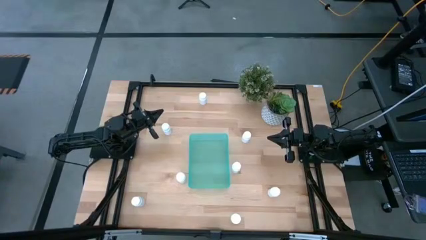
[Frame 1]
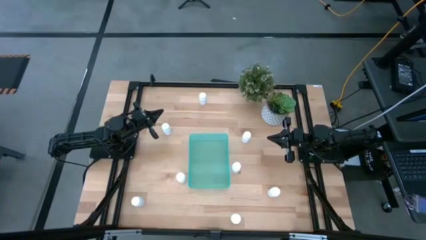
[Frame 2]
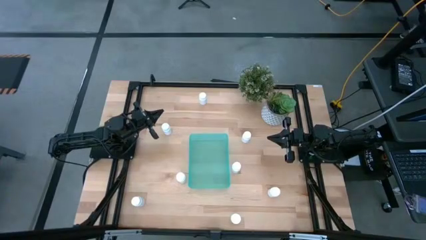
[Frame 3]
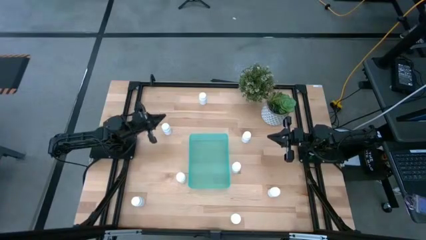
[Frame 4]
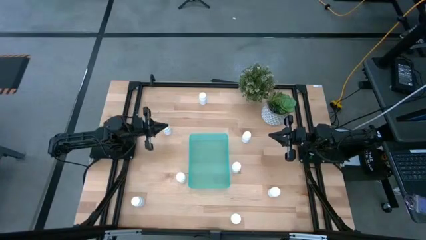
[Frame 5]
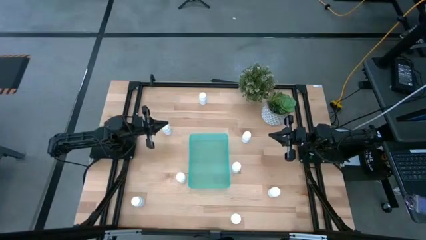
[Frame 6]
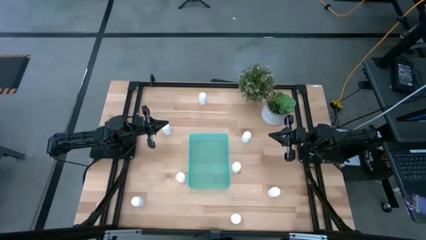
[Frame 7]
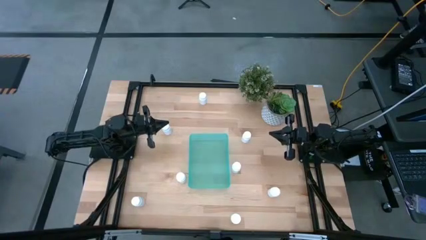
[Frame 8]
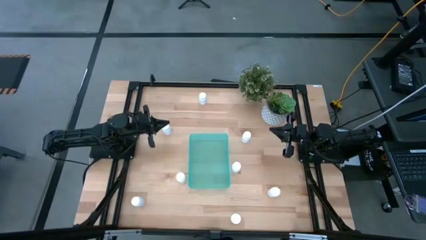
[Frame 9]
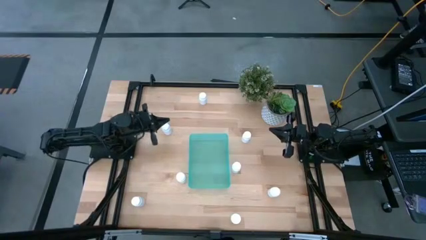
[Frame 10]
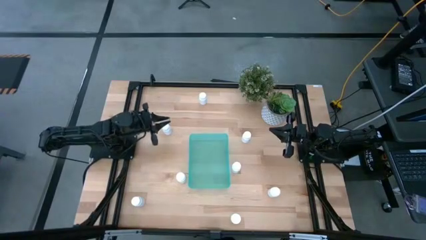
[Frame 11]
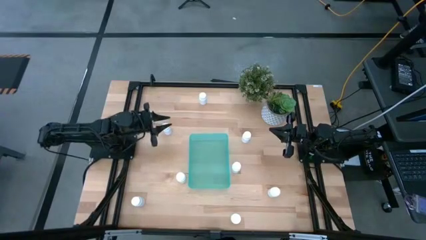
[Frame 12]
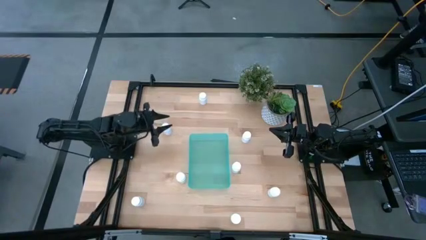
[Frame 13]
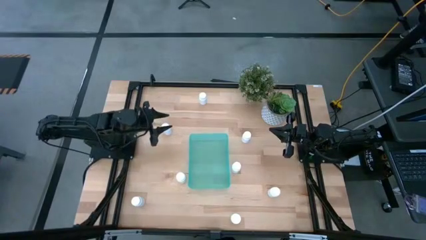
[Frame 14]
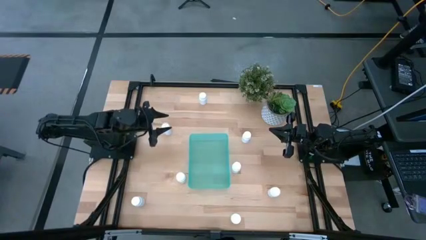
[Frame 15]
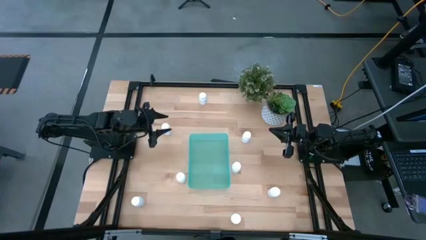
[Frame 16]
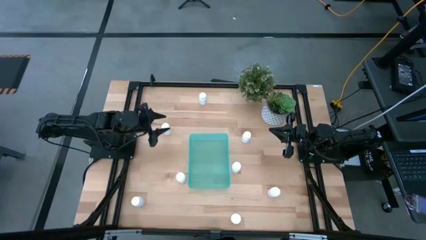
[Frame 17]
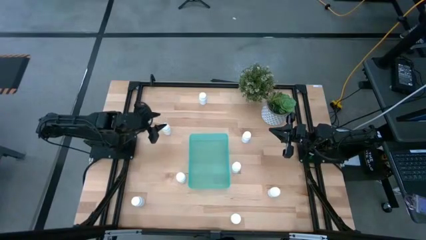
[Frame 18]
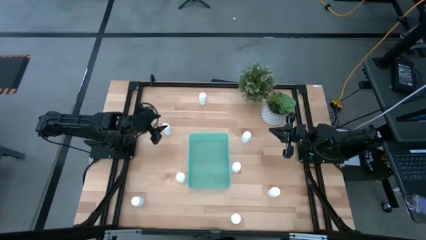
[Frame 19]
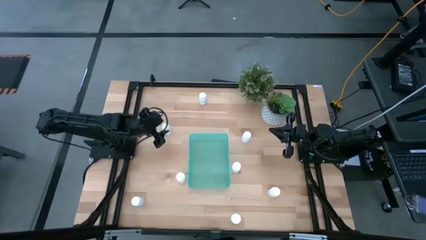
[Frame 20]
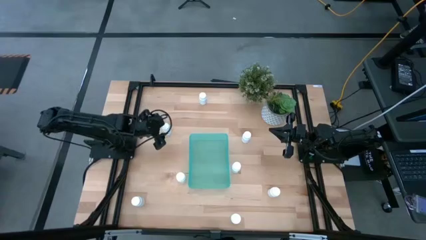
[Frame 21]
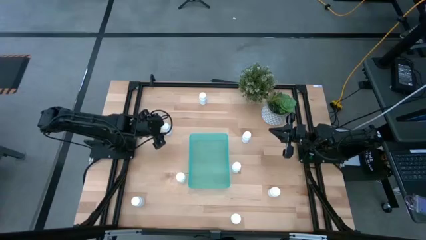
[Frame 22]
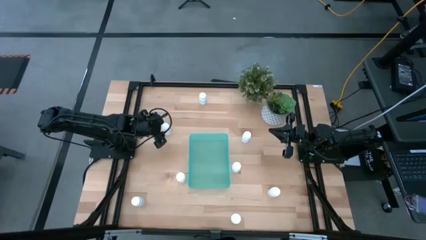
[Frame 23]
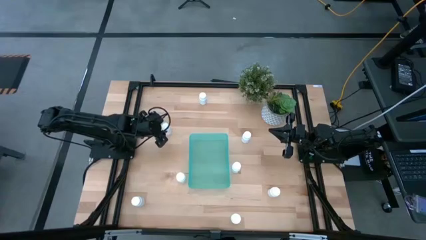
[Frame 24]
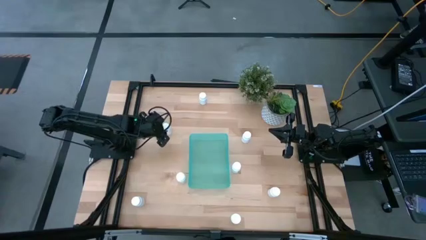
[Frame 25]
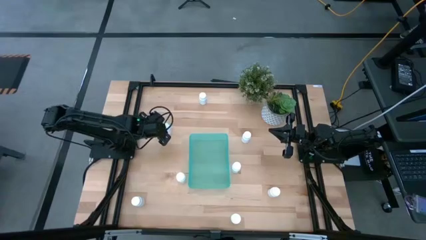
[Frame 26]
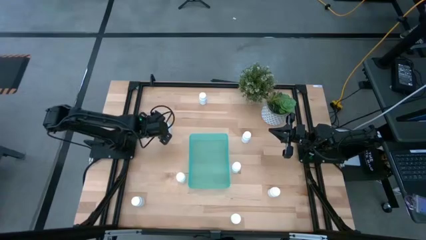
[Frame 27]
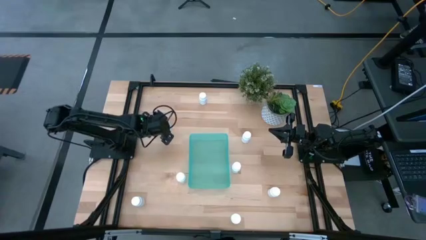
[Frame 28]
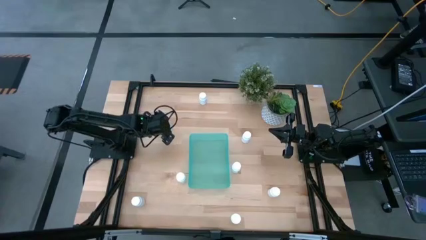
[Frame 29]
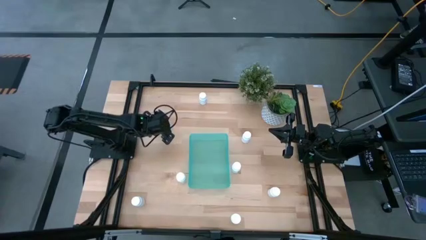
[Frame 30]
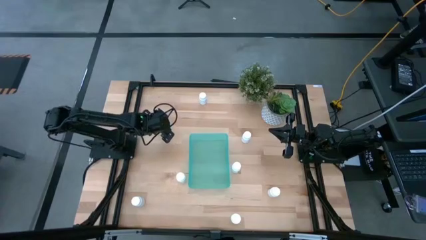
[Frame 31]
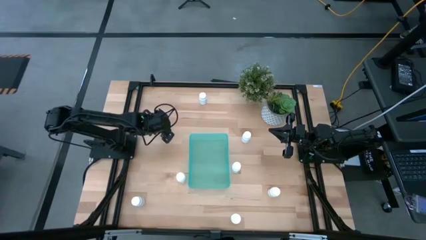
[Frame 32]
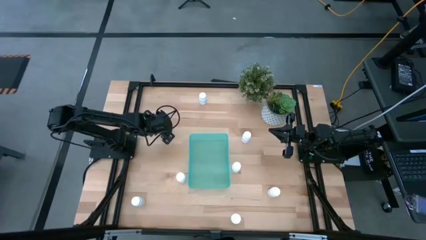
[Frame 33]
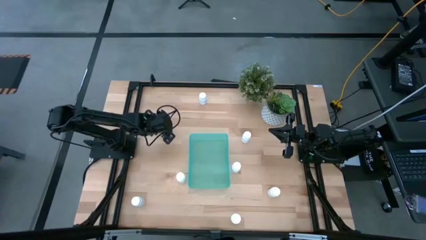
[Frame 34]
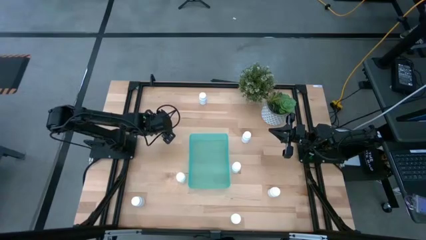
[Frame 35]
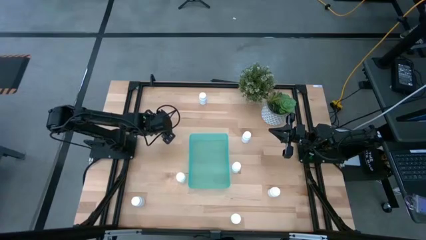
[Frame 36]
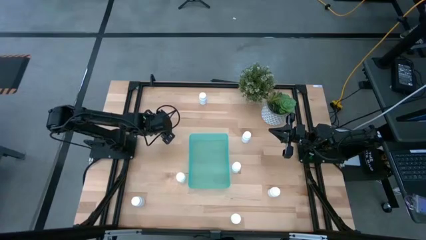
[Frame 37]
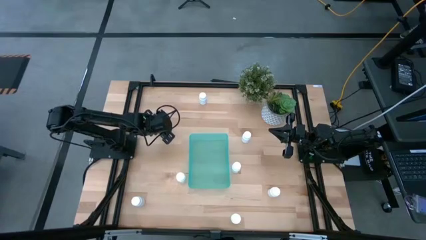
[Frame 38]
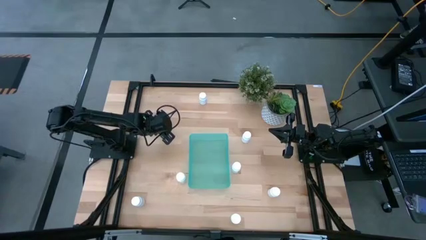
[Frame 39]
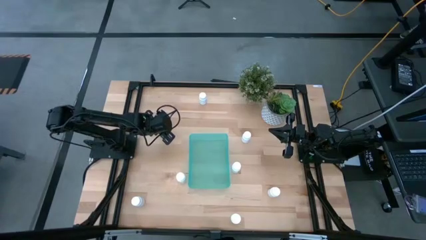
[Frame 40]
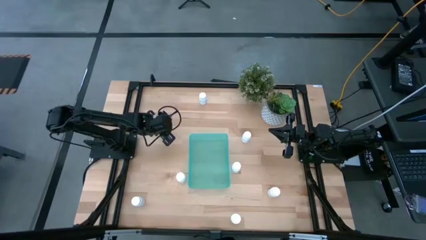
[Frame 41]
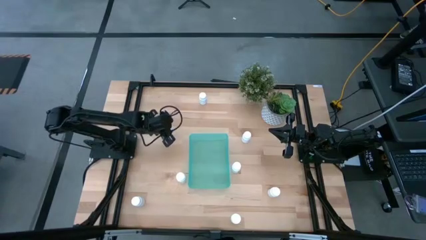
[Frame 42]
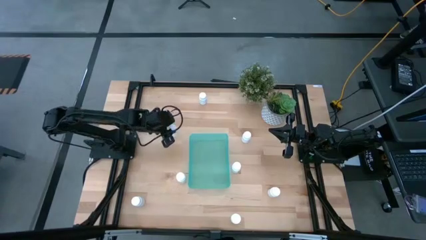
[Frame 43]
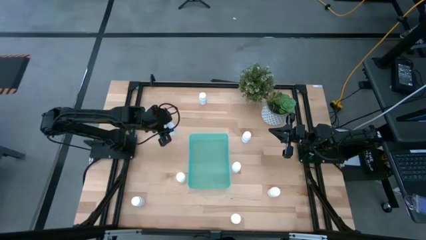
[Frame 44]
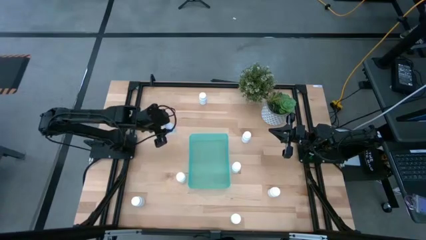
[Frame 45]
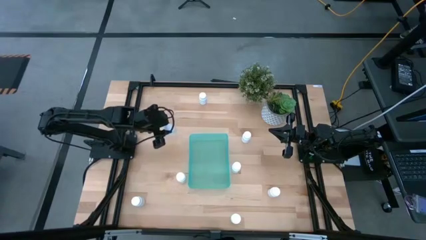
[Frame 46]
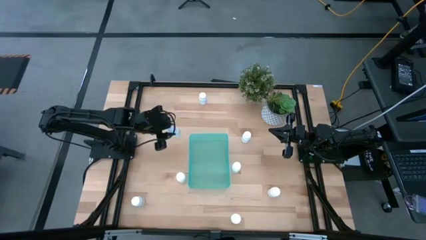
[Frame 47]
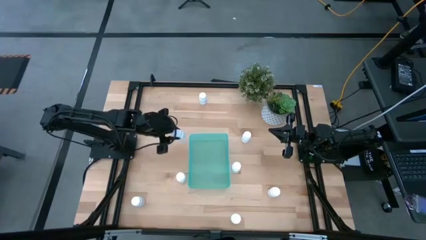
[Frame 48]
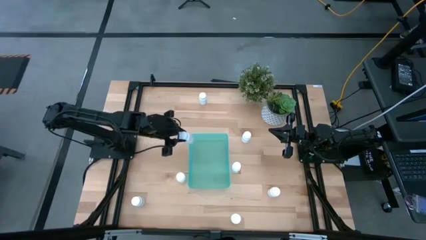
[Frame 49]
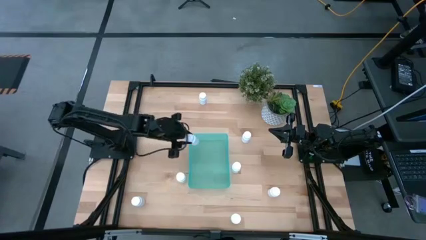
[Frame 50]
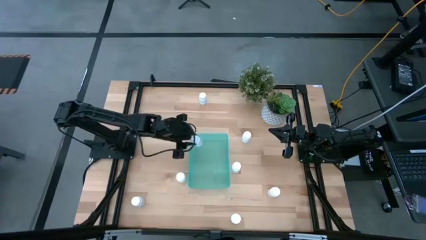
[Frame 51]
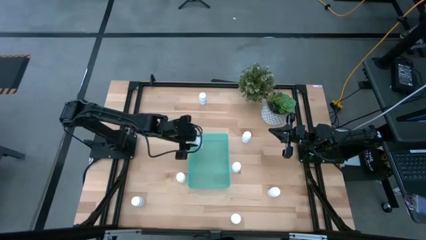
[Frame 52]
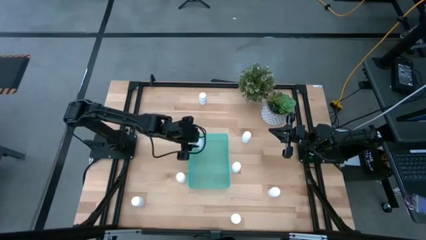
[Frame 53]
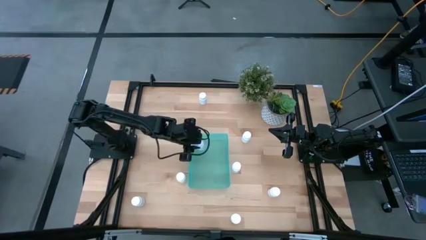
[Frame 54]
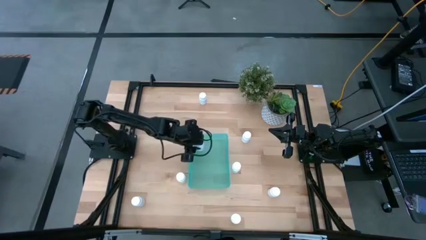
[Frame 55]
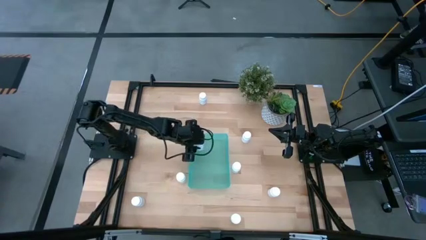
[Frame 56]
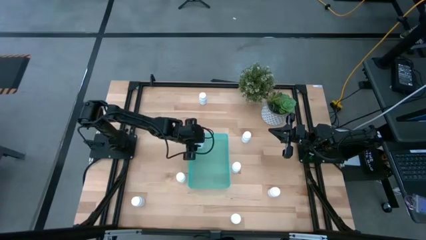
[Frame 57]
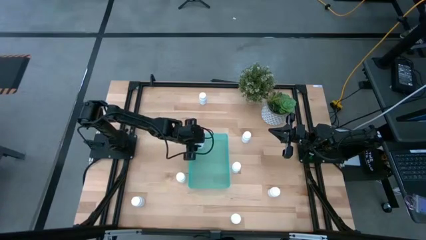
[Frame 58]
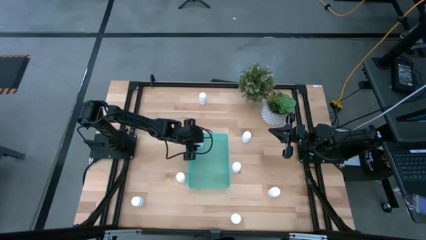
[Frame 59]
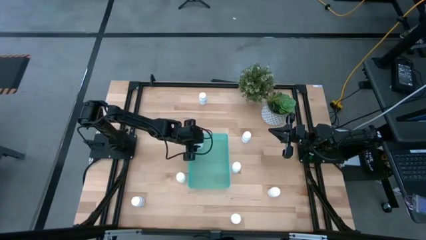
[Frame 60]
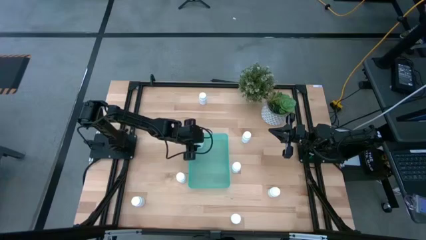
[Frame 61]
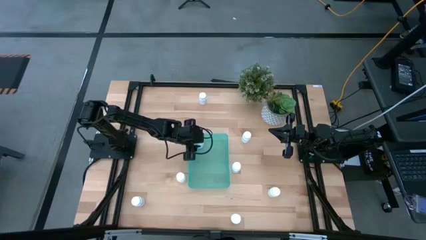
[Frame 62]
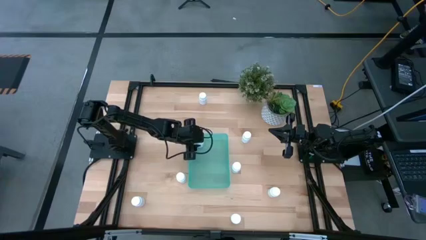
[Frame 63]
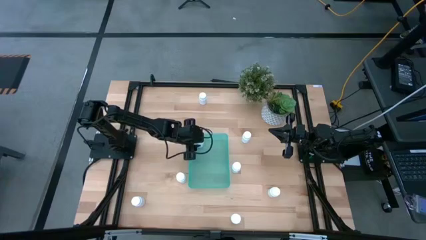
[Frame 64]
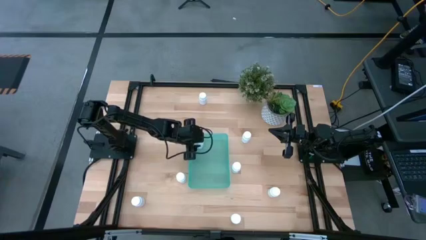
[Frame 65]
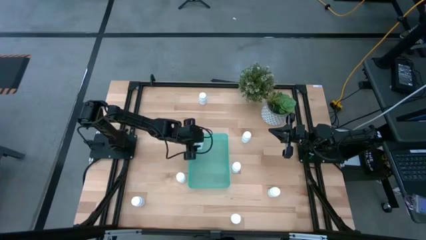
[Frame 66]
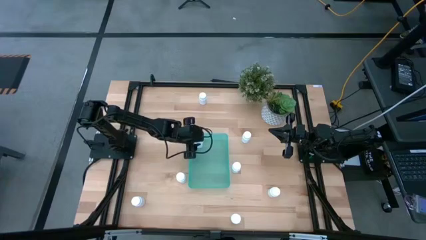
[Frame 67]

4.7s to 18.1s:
Task: Pick and place pill bottles into a basket
Put the white pill bottle into the green bin

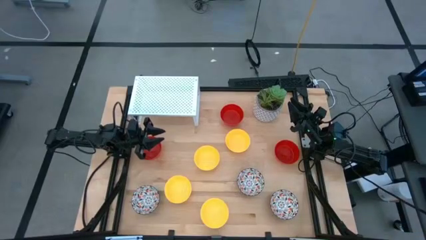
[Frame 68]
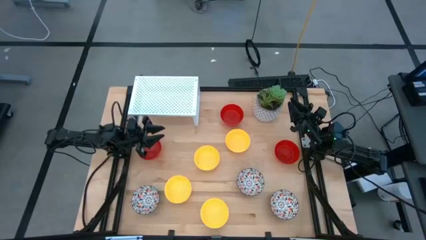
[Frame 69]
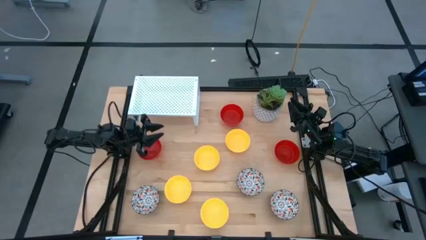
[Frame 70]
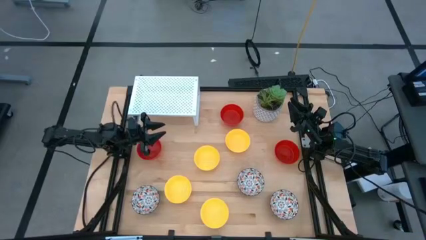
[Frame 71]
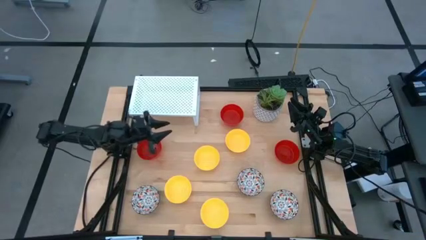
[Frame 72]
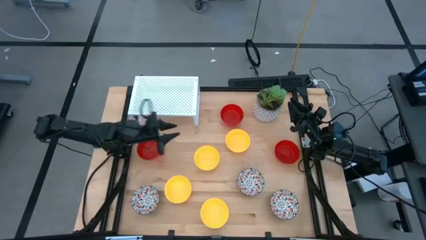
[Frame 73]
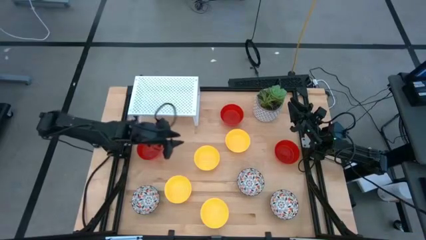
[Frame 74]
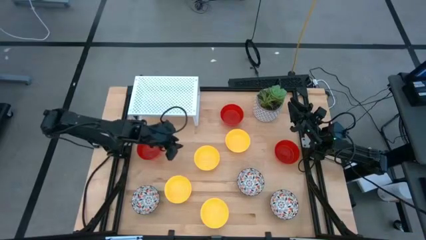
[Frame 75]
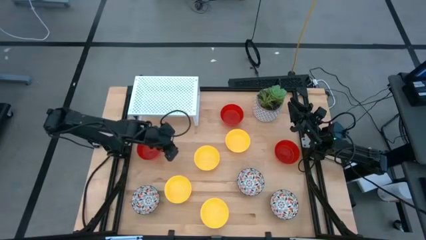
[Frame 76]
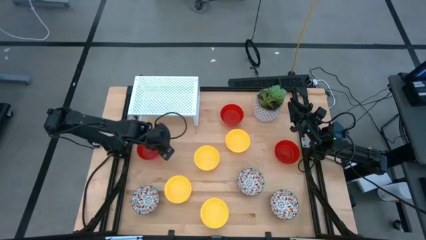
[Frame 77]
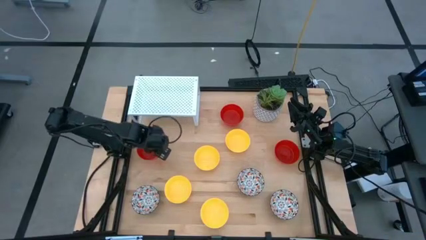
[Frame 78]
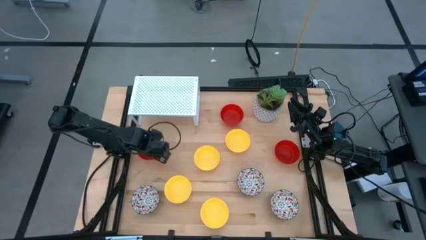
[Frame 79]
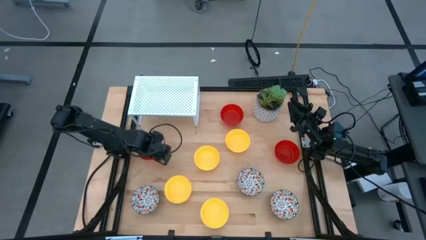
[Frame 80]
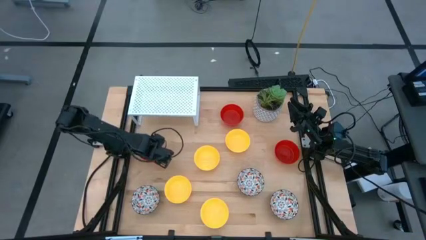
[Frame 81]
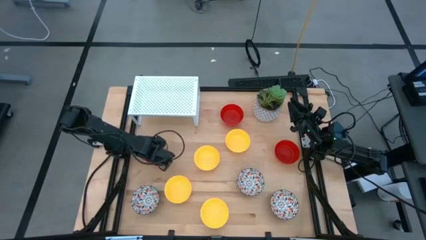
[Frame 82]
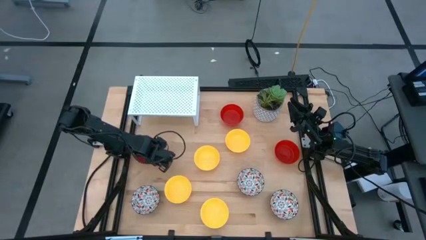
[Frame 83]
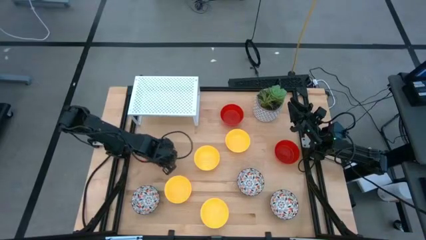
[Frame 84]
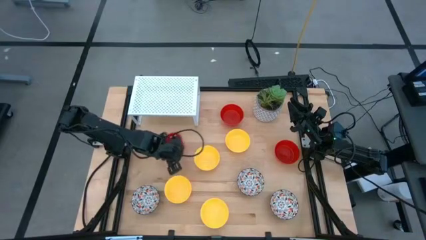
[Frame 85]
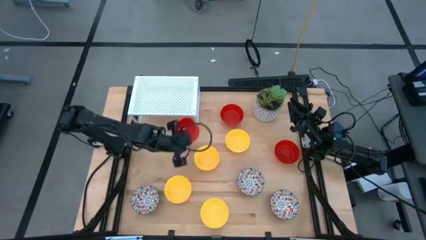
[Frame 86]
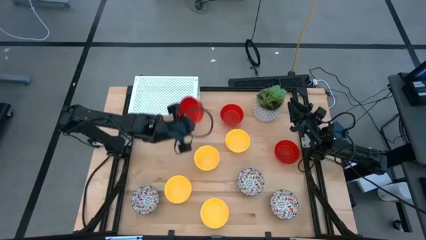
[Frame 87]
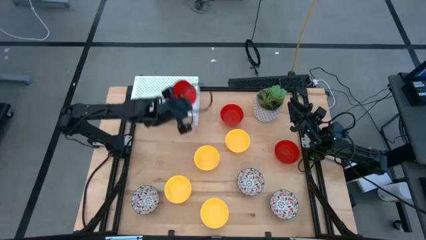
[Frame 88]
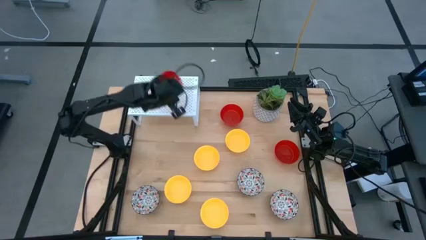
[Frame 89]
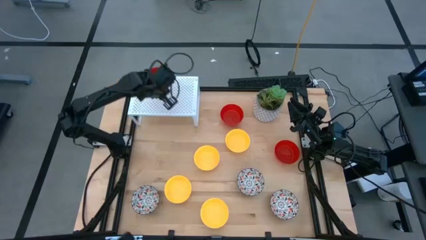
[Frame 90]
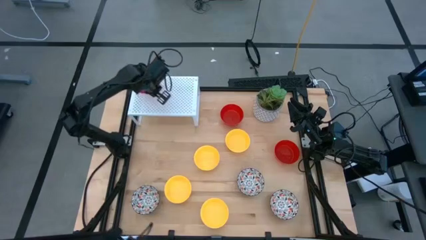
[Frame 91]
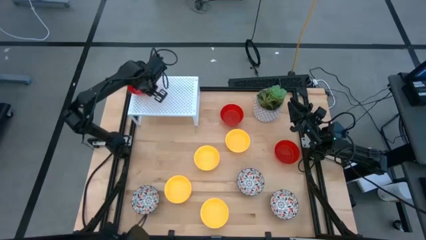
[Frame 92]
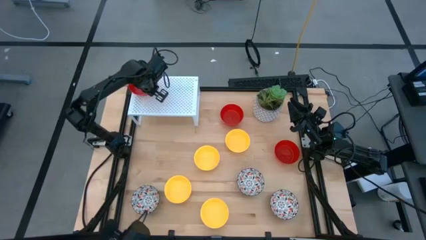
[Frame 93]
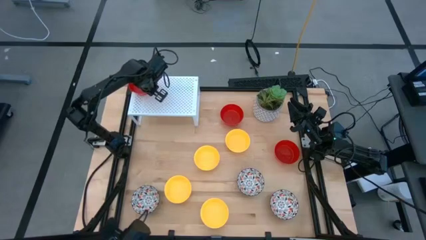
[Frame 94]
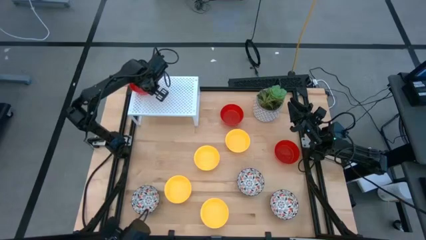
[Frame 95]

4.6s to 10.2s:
Task: Pick & Place Mini bowls
Put the left red bowl on the shelf
